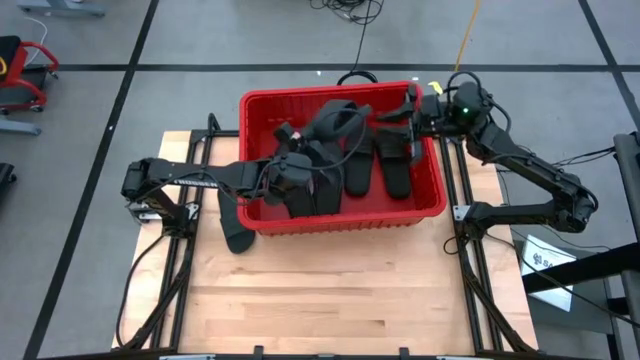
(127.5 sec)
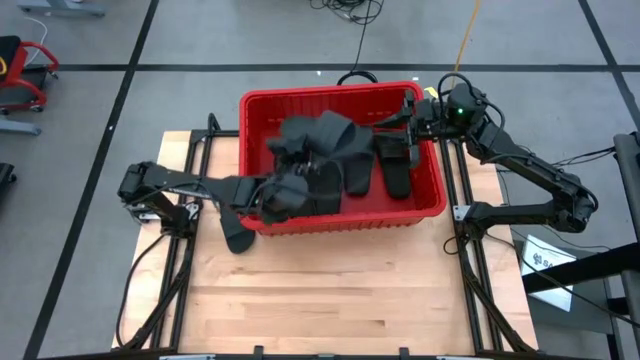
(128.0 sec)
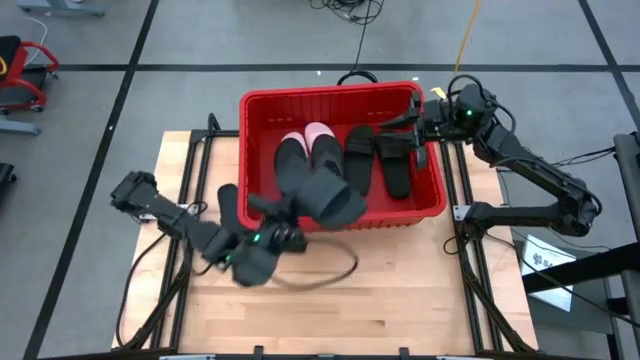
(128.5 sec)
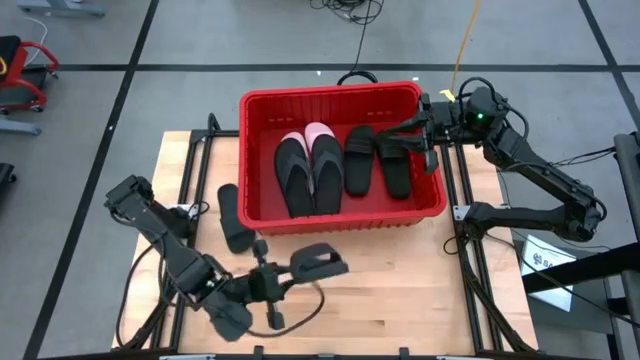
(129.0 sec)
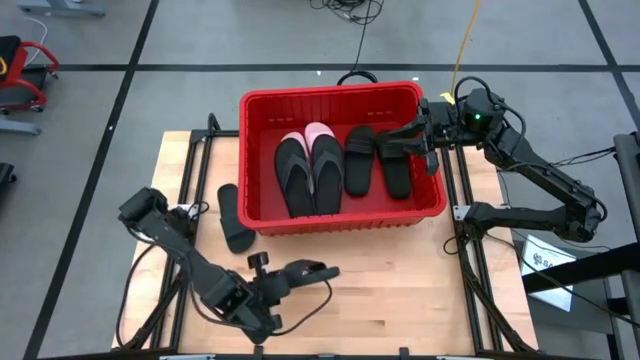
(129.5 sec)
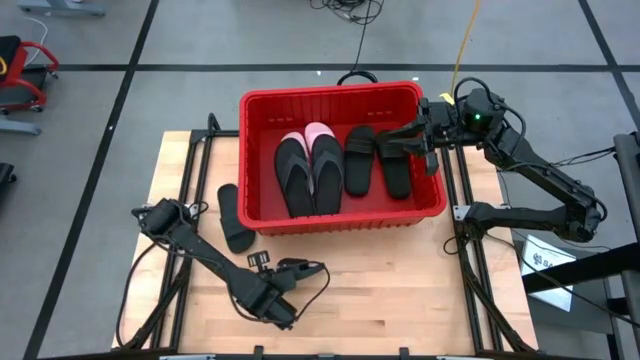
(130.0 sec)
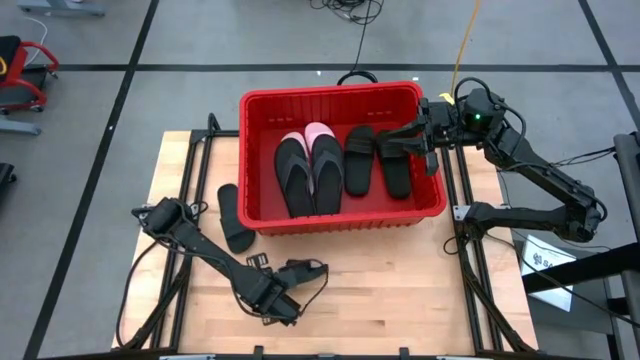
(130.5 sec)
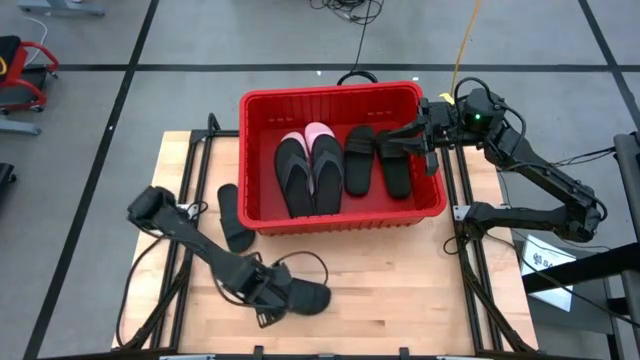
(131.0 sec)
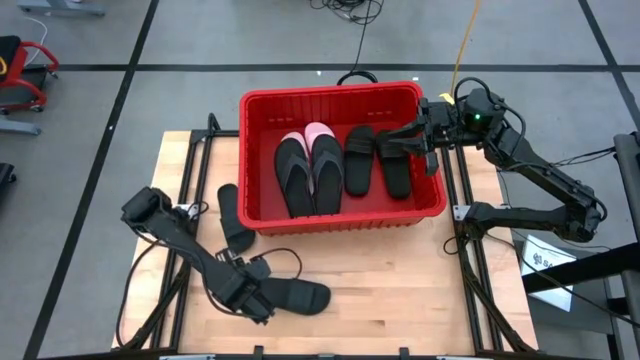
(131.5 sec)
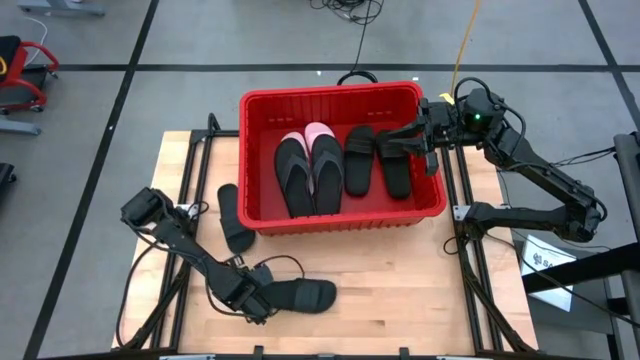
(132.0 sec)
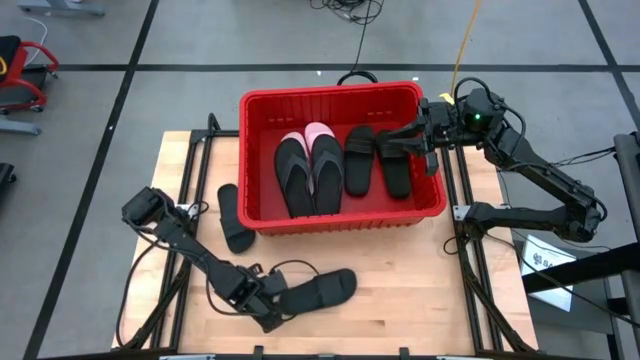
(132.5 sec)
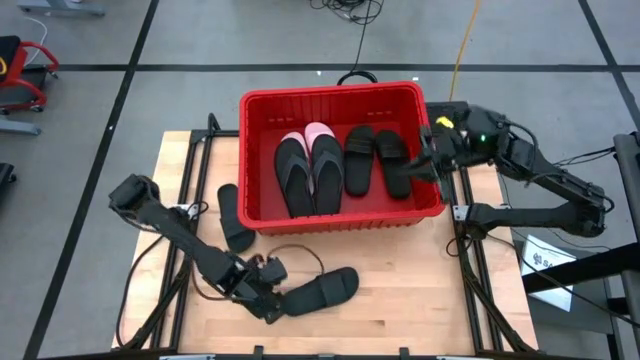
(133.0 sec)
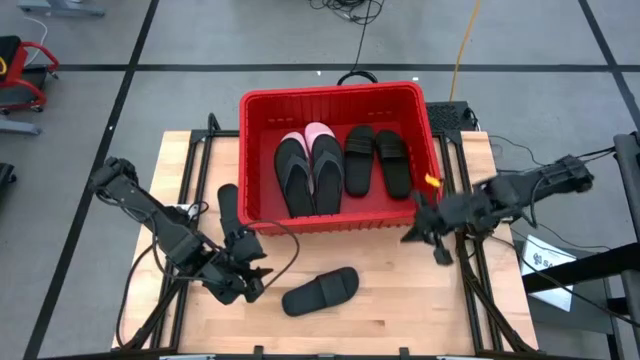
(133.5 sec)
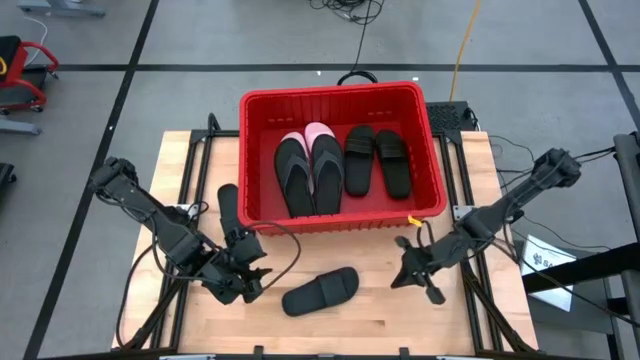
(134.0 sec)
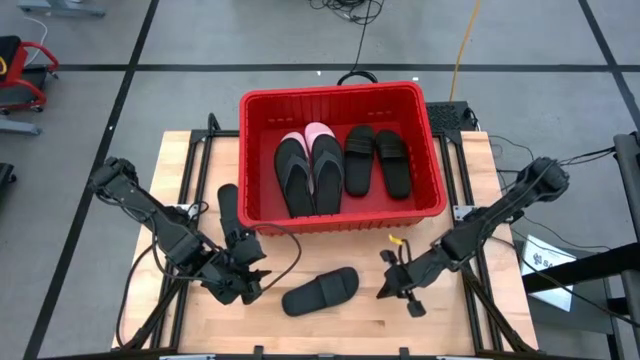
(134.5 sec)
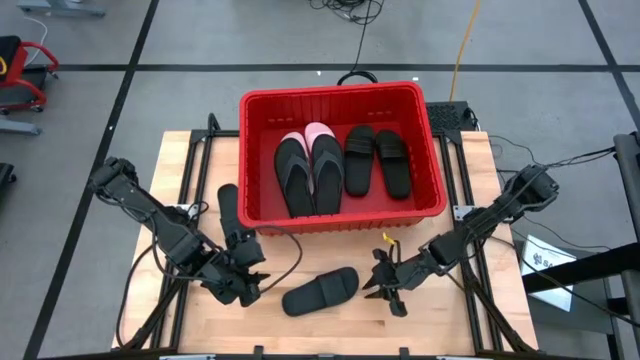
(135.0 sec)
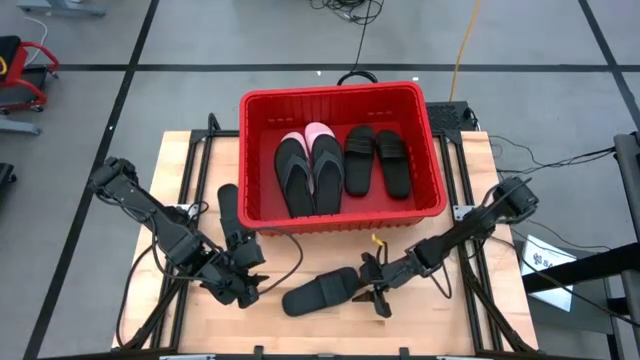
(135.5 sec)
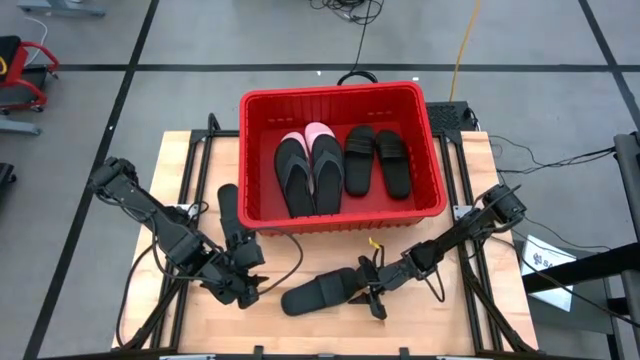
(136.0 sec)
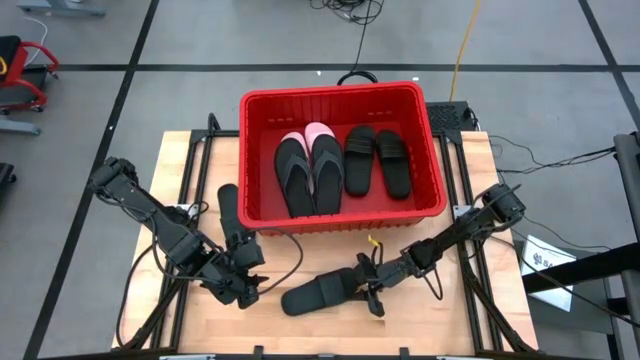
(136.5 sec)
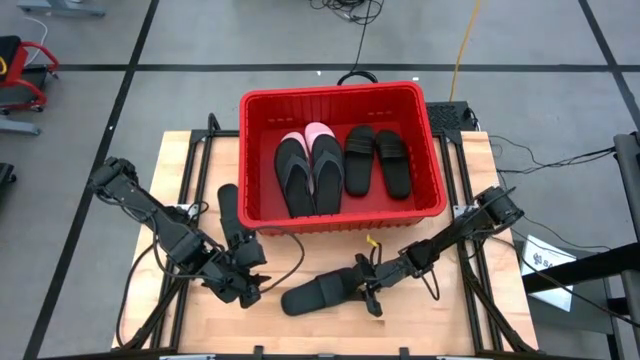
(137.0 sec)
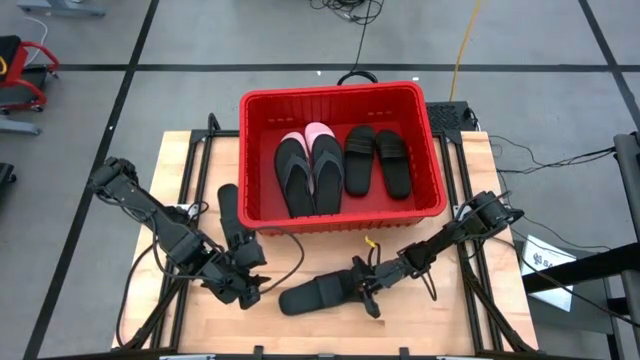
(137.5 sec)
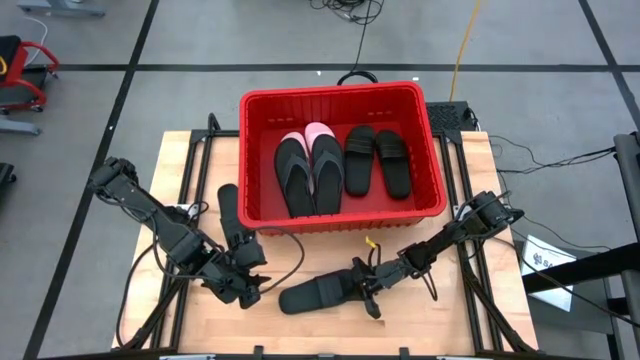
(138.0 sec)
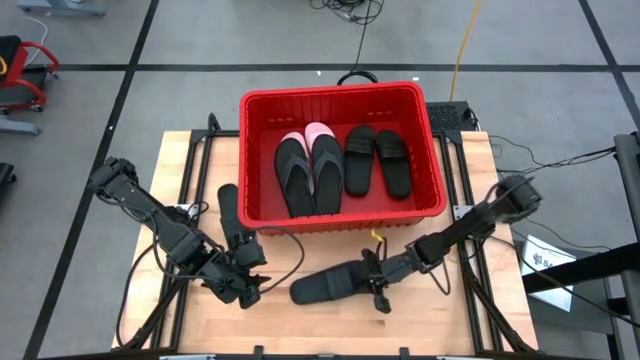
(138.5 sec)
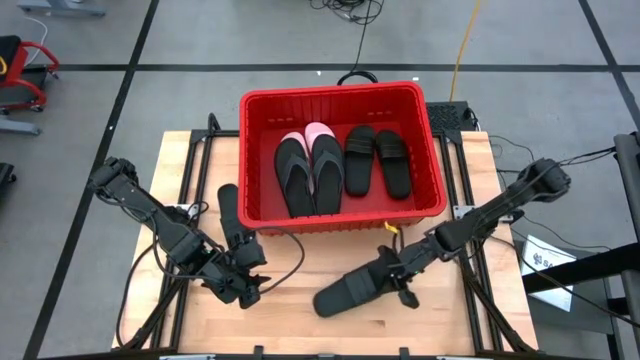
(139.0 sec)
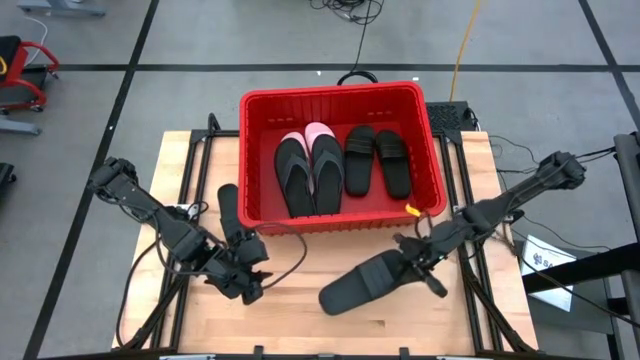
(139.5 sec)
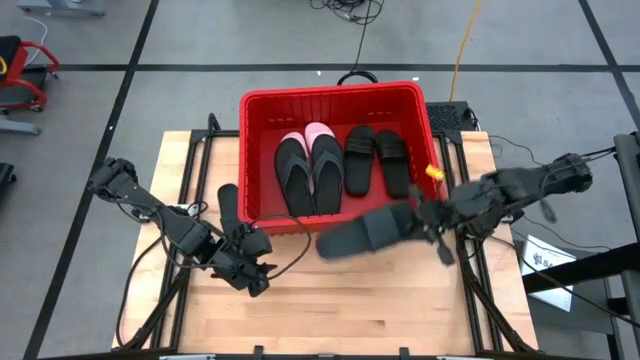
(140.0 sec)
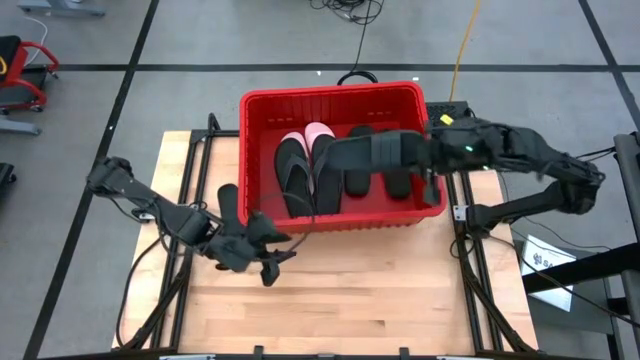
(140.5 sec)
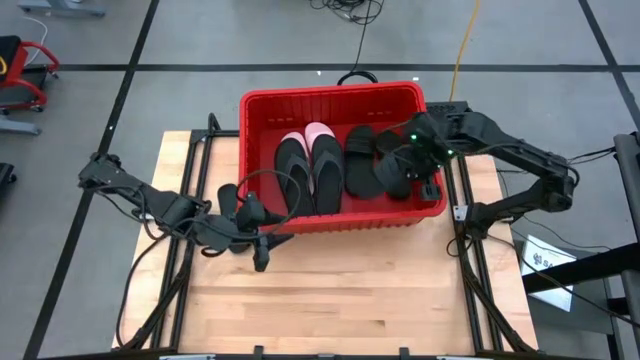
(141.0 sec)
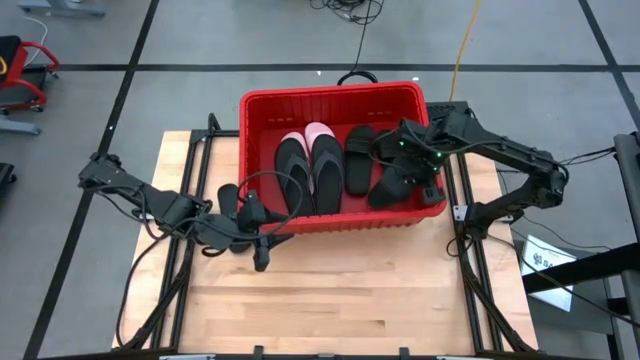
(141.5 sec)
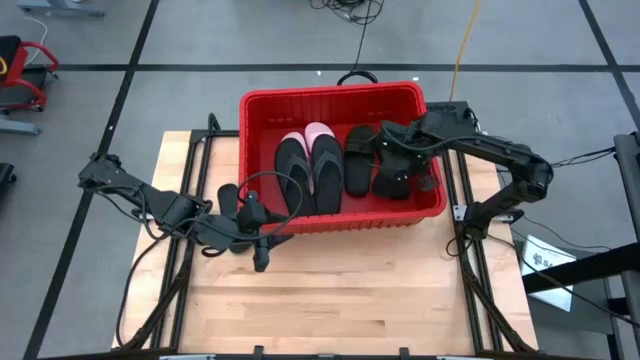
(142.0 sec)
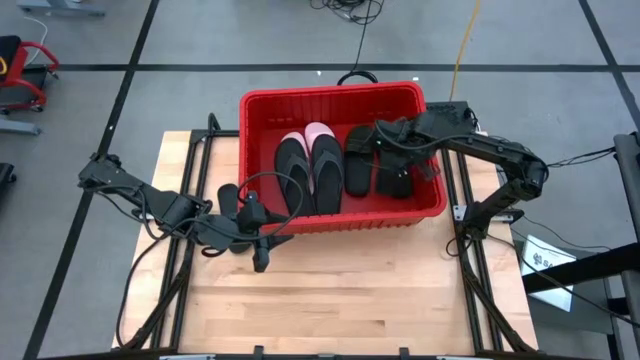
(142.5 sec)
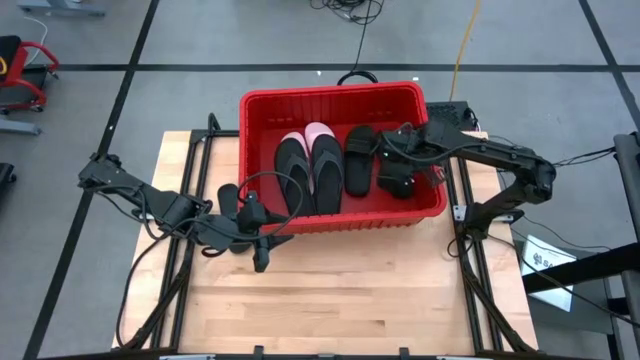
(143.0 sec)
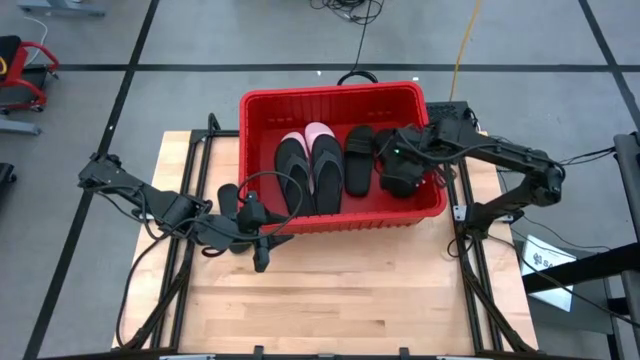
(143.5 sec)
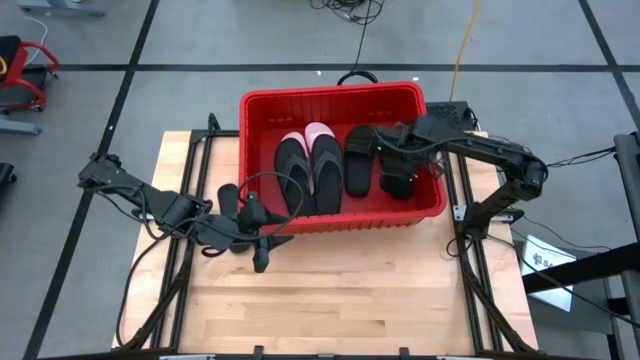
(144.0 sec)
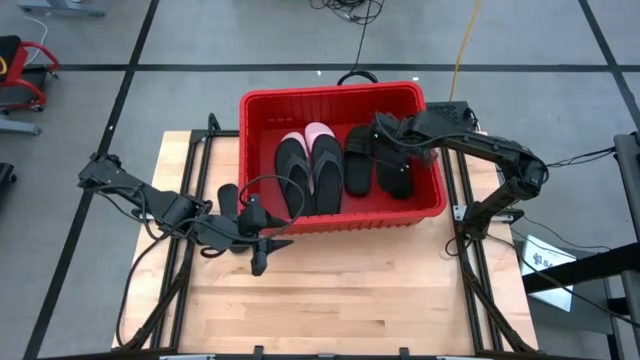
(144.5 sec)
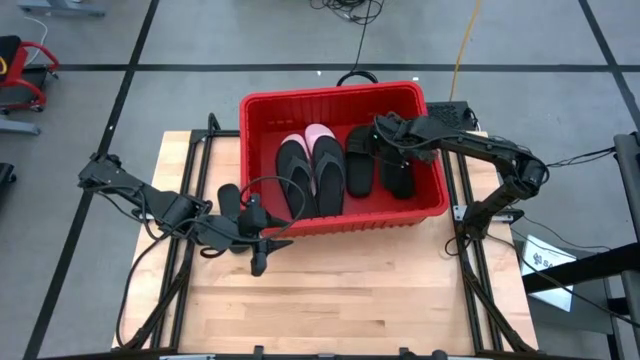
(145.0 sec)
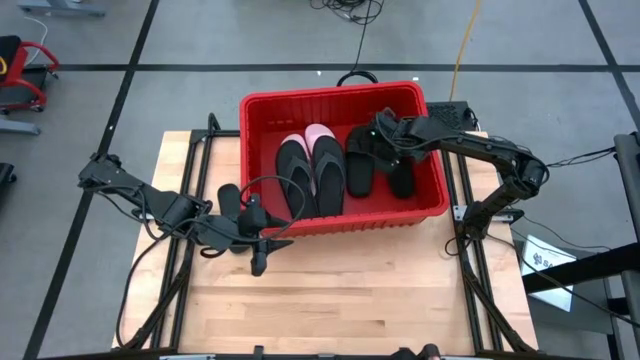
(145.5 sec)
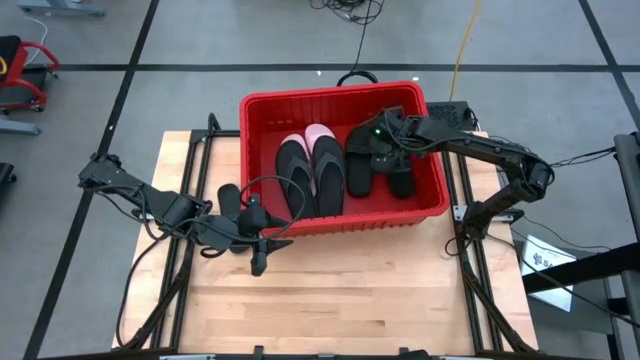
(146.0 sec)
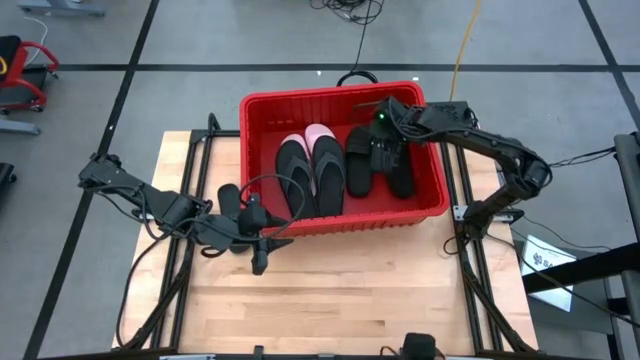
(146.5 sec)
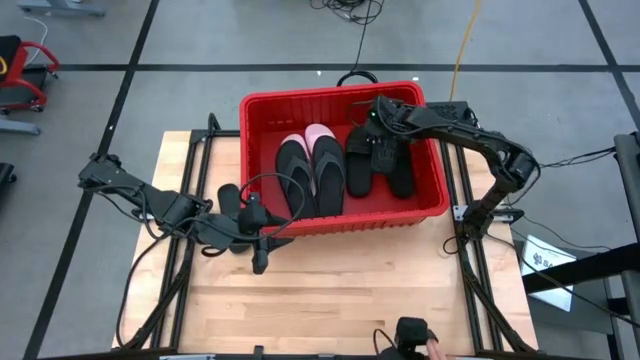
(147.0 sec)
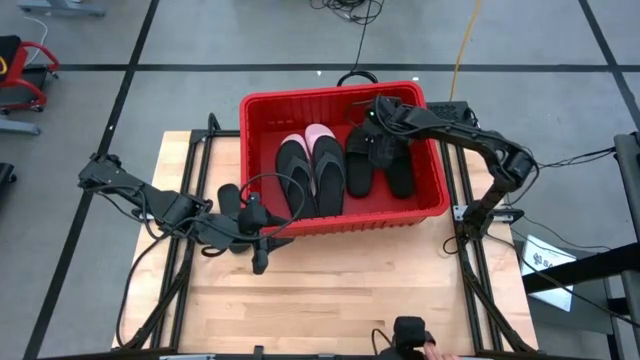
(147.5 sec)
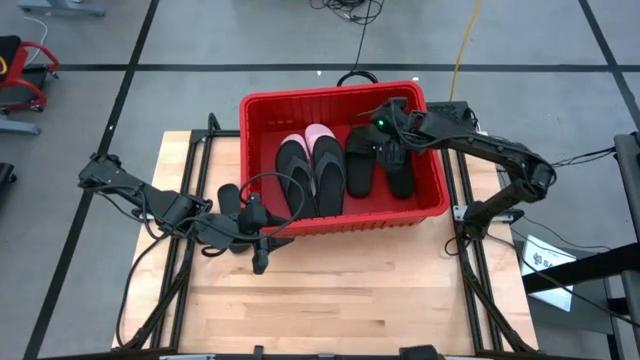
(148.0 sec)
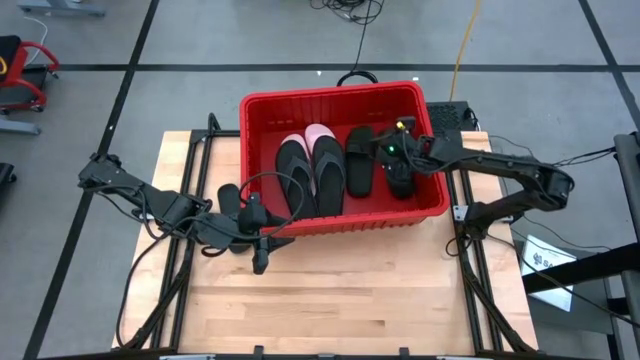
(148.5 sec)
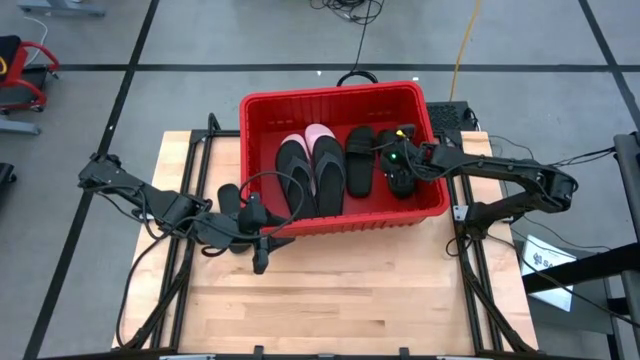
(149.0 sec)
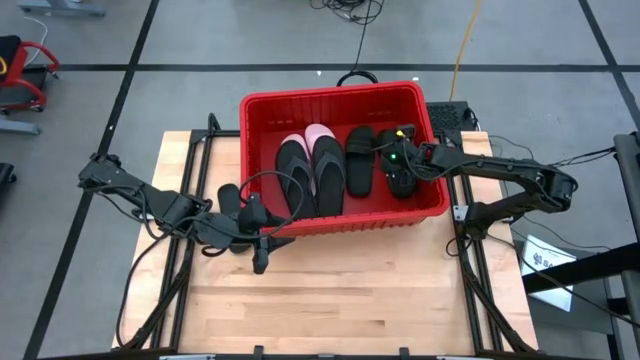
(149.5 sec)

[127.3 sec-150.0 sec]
Task: Pick and place slides into bin
Put the black slide into the red bin
